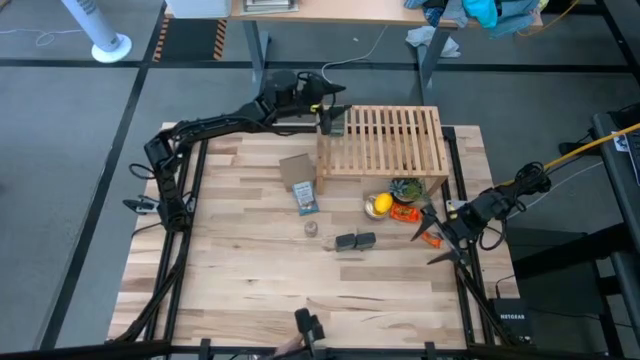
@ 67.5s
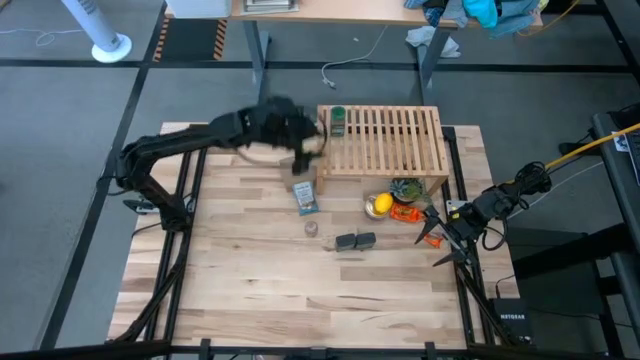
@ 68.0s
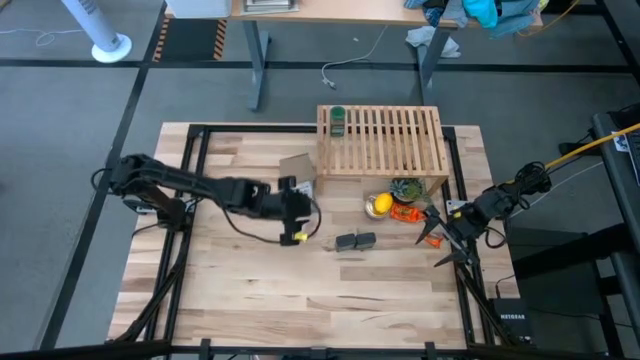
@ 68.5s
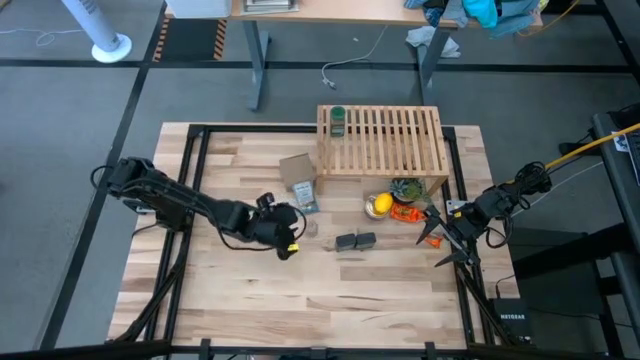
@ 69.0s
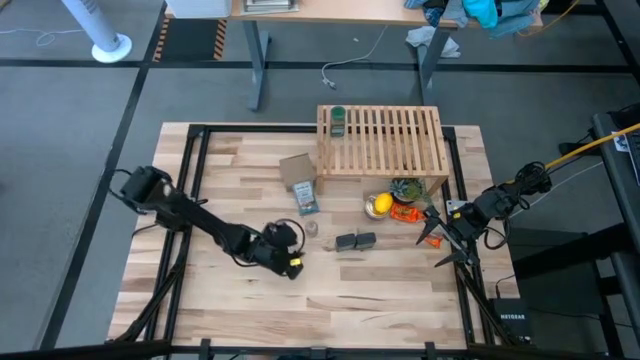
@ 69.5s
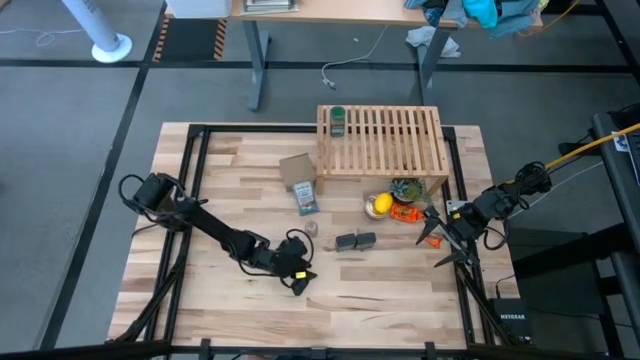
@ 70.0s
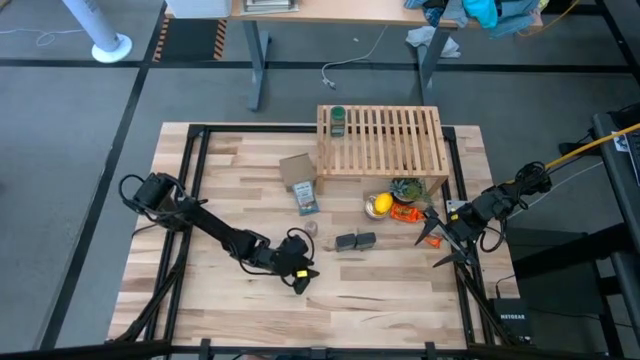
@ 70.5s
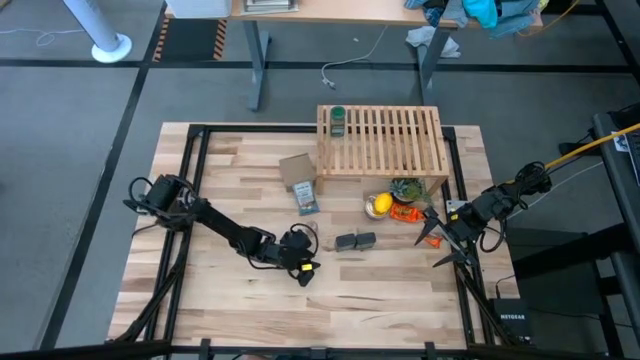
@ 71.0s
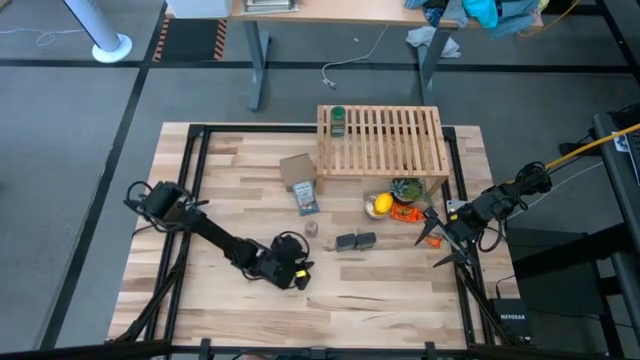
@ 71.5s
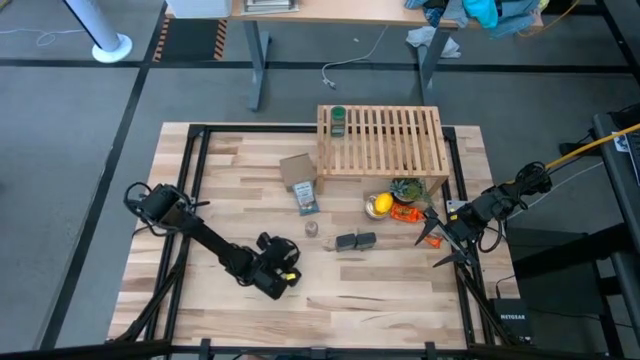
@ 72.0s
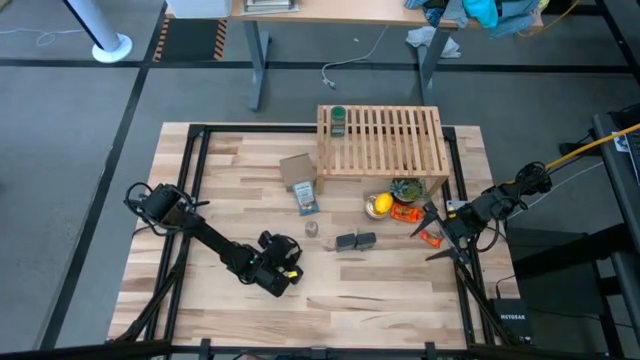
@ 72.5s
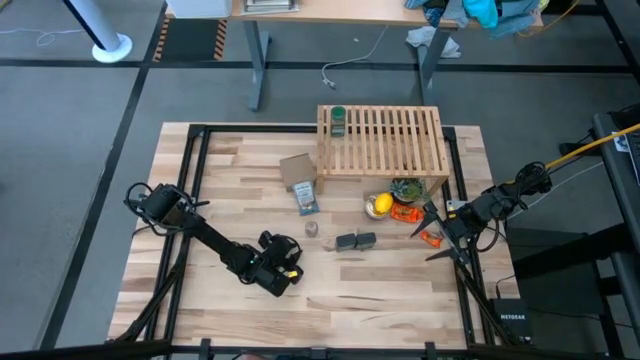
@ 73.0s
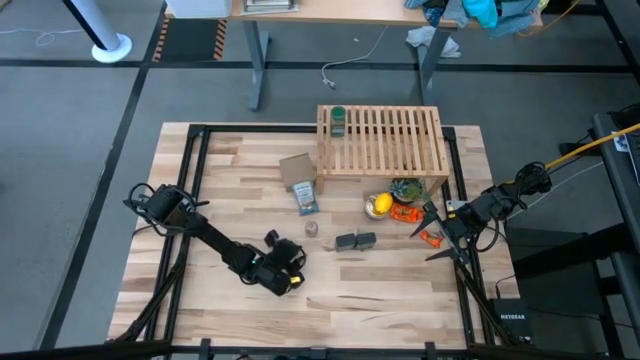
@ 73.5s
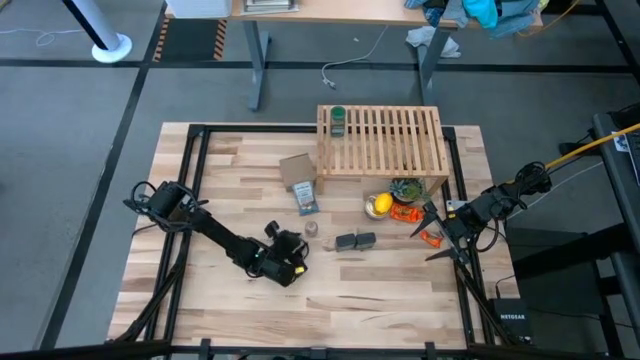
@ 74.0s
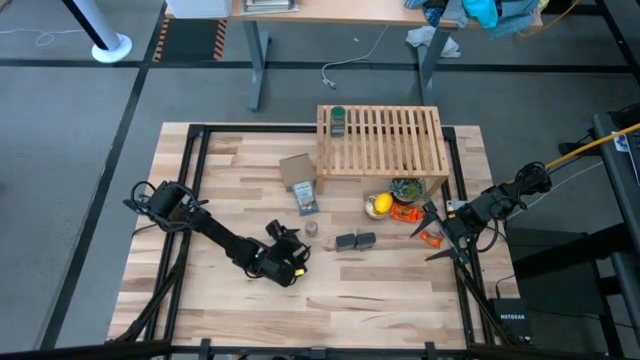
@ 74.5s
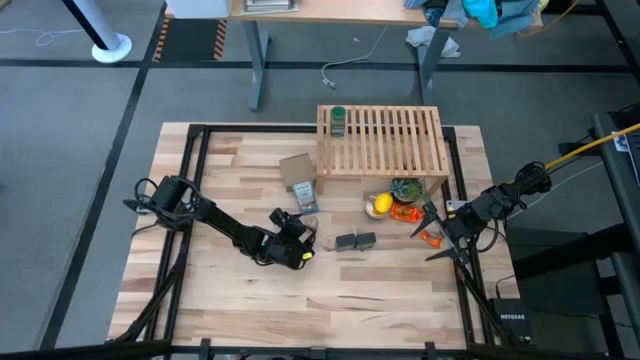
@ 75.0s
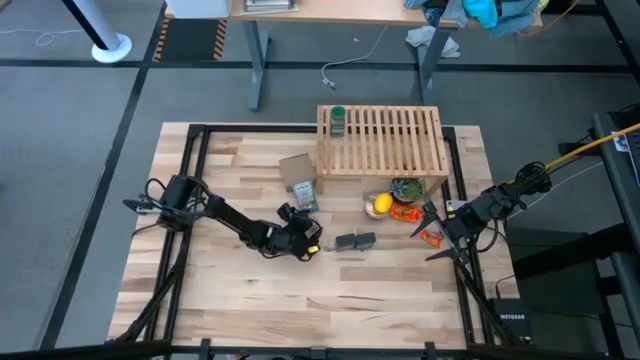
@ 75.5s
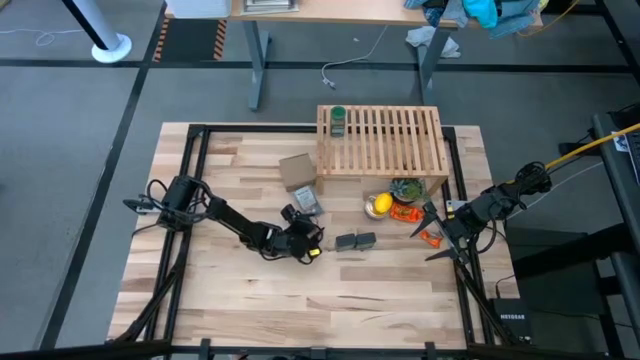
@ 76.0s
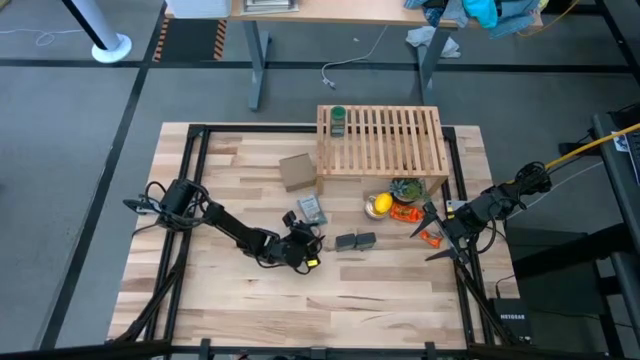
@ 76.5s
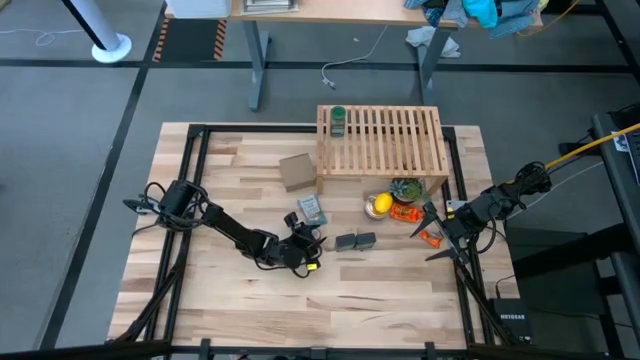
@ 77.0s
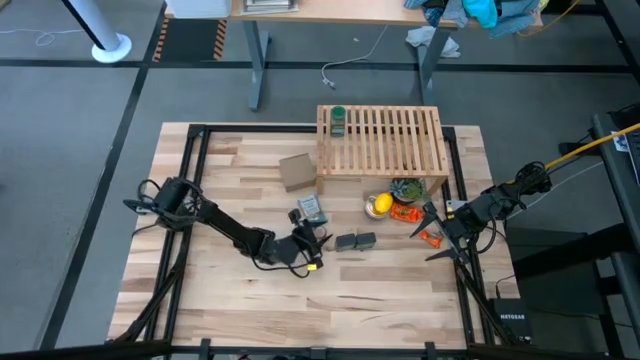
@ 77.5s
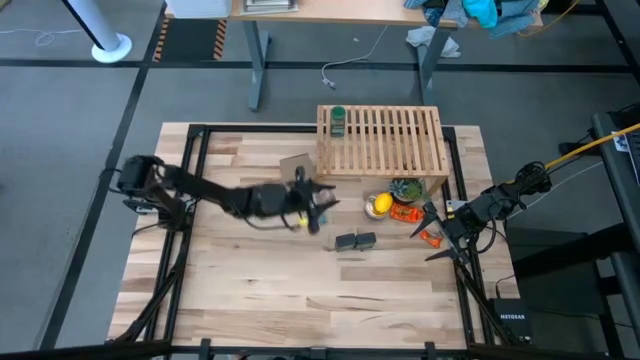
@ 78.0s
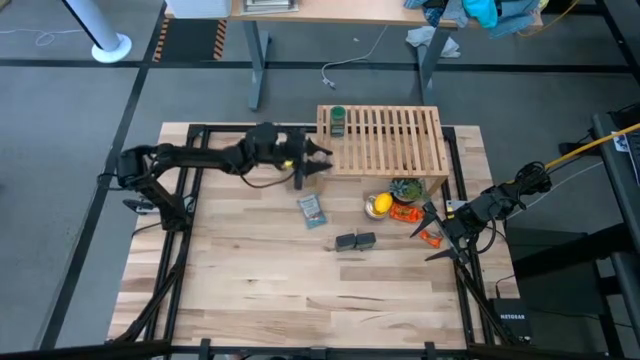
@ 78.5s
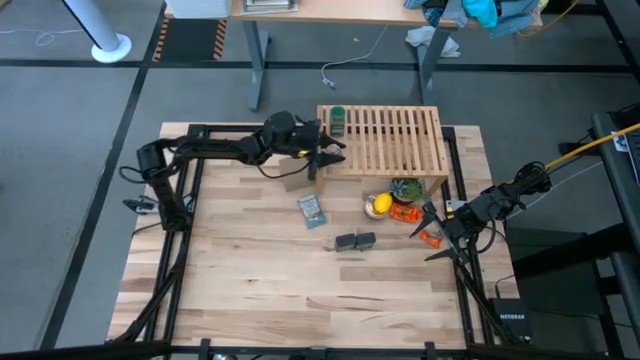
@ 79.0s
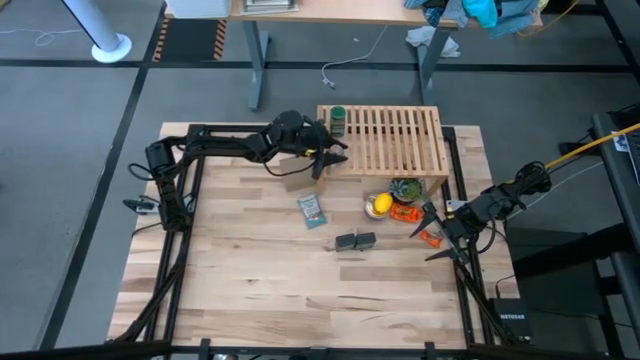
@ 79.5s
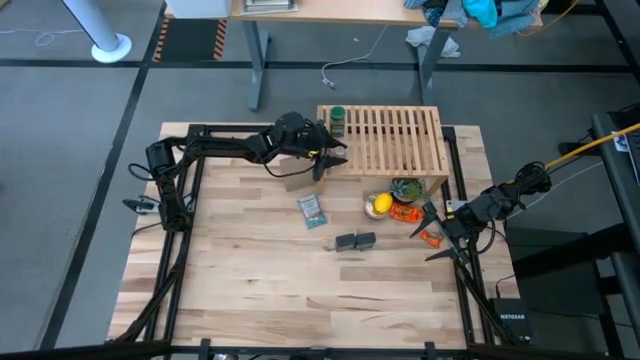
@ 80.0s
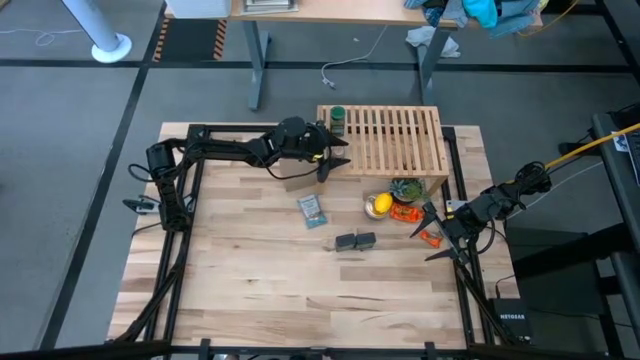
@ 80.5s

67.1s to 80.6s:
Task: Shelf spices
Put the brown seasoning bottle on the shelf

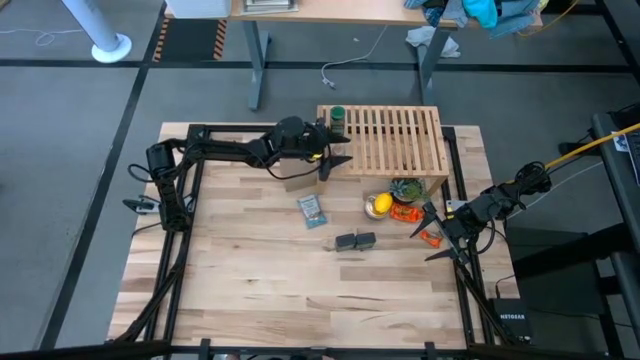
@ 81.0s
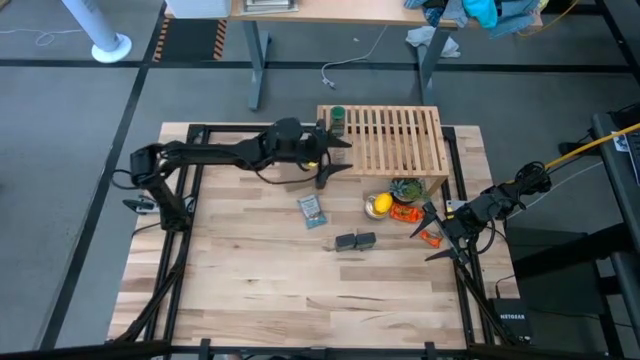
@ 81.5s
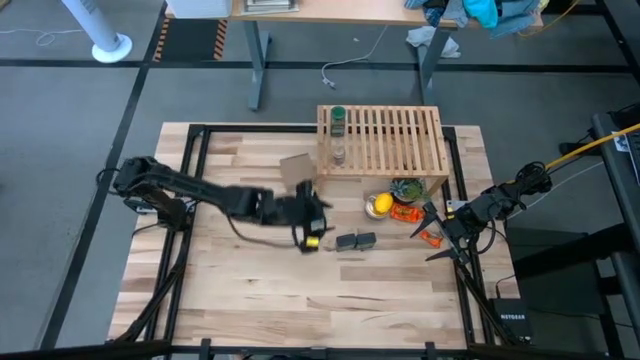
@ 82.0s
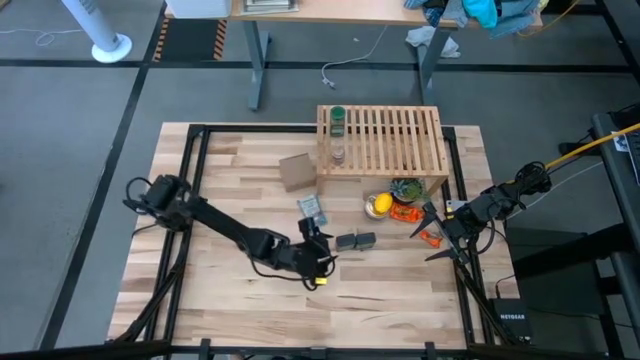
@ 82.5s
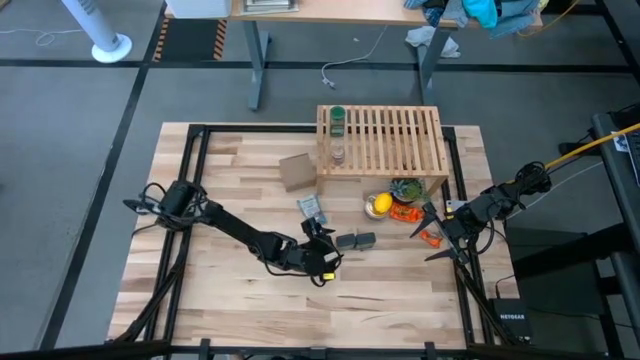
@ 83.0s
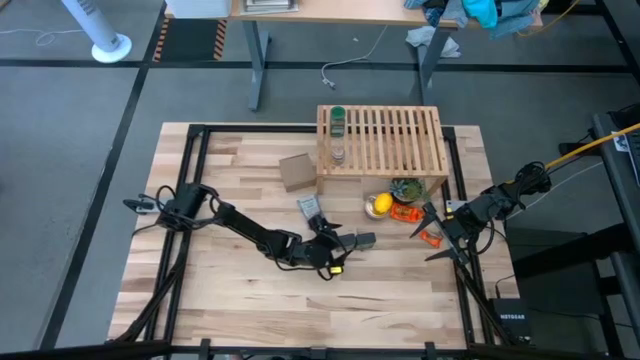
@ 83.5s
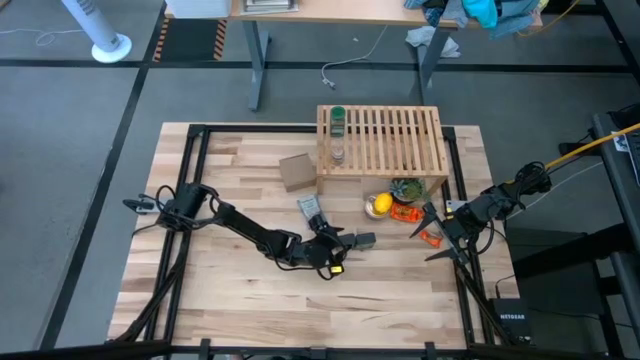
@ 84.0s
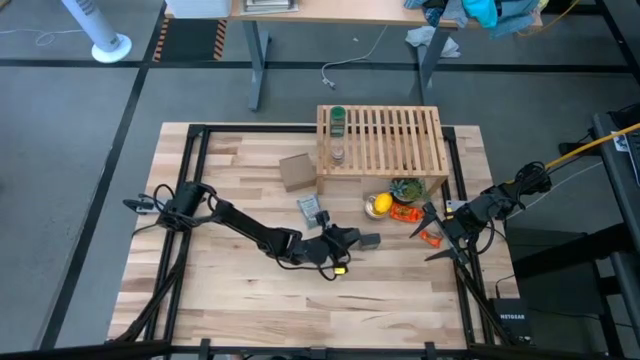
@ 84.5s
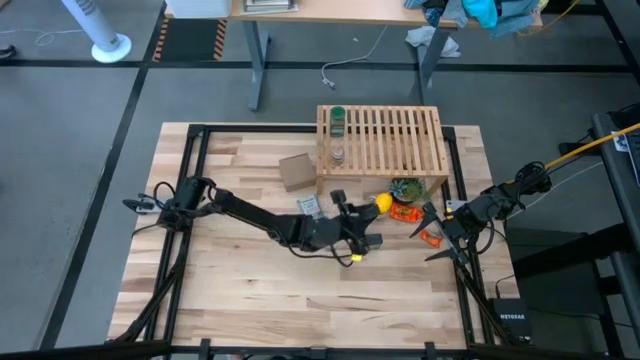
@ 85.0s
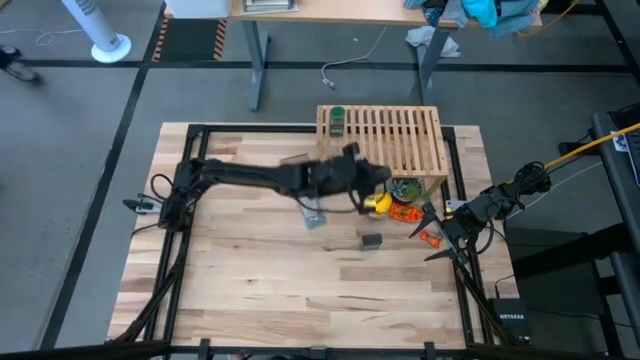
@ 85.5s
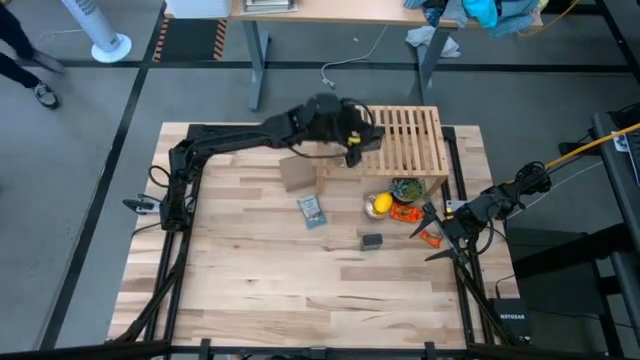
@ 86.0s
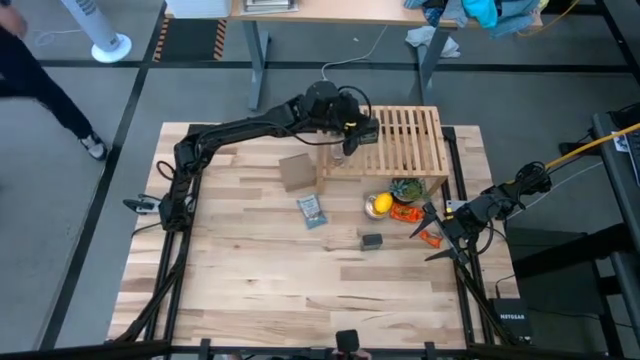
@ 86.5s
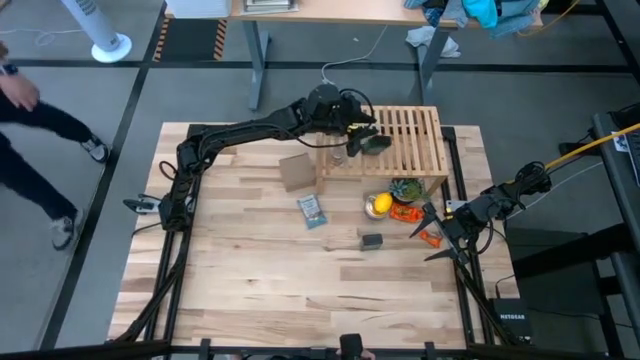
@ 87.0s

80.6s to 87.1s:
Put the left black seasoning can on the shelf

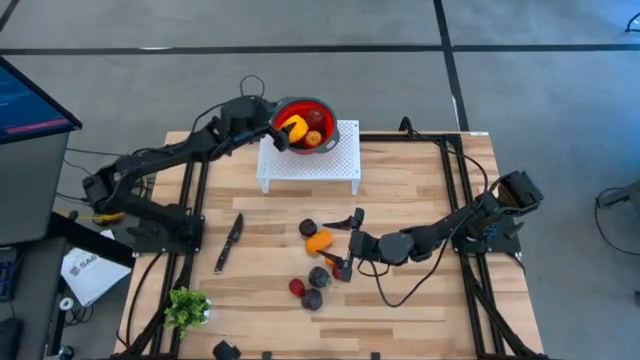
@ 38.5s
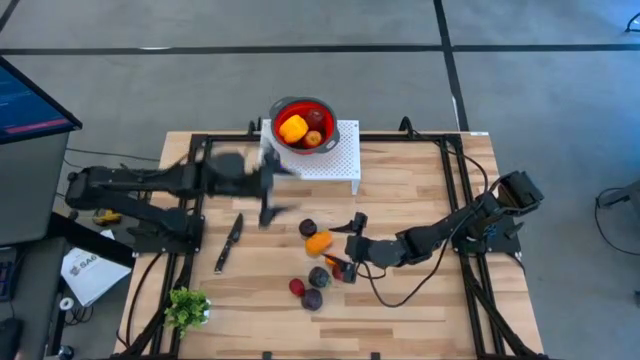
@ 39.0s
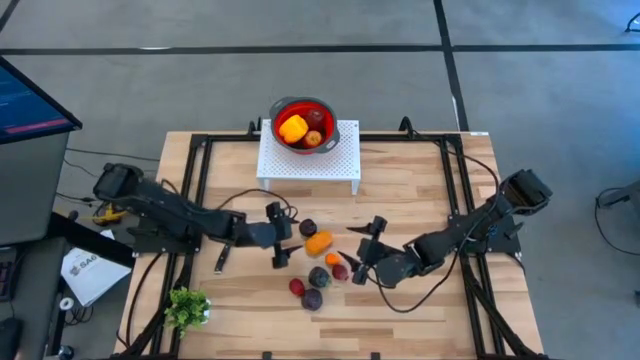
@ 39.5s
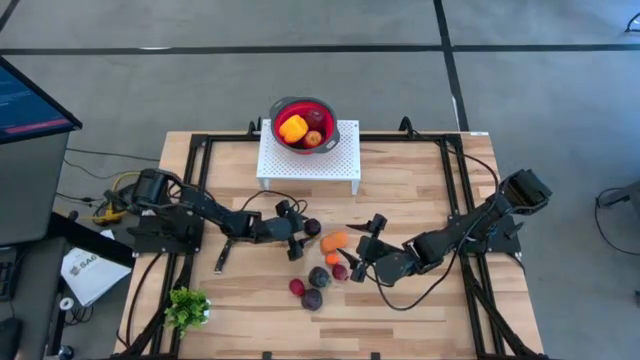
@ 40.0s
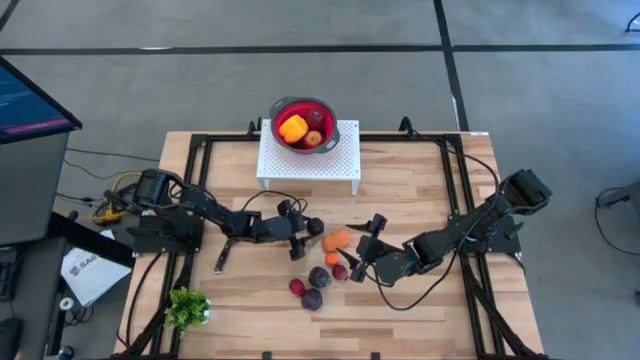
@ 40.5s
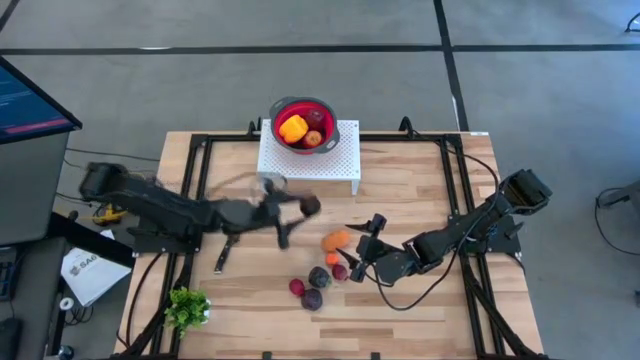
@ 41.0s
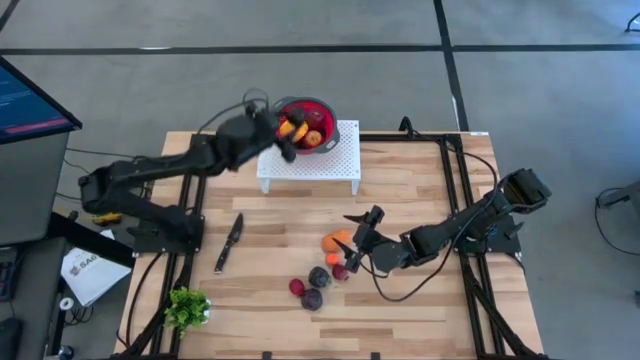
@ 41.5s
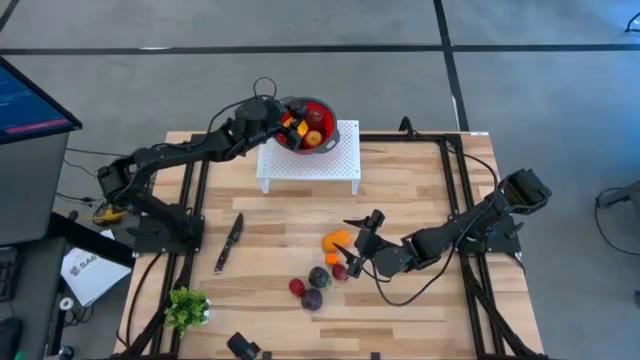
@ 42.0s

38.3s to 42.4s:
Task: Pick & Place Fruit
Put the top purple plum into the red strainer bowl on the shelf
